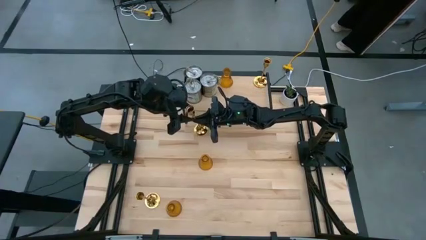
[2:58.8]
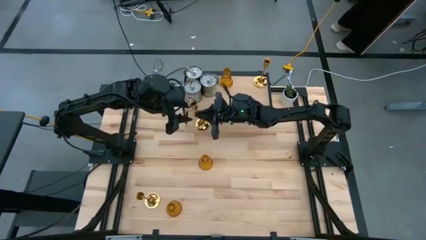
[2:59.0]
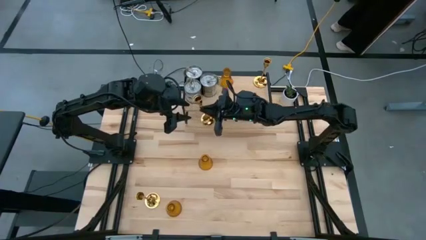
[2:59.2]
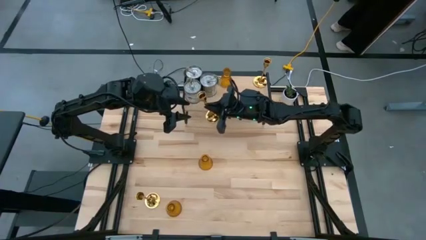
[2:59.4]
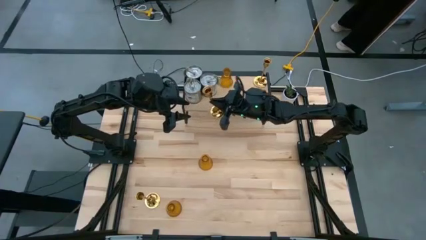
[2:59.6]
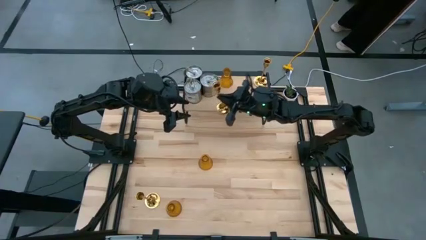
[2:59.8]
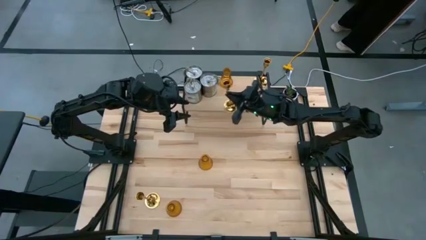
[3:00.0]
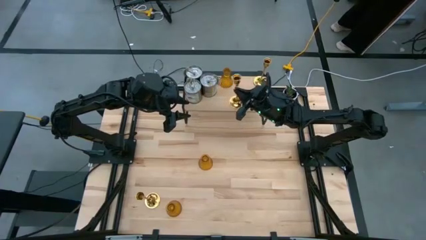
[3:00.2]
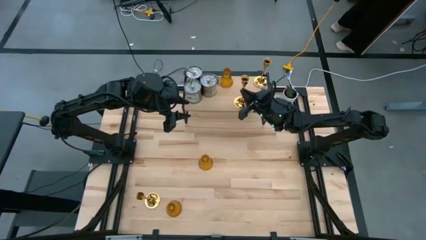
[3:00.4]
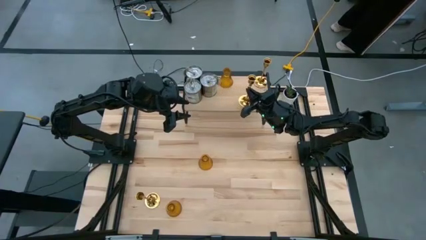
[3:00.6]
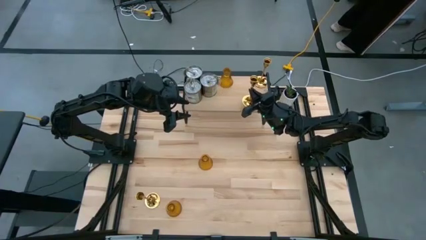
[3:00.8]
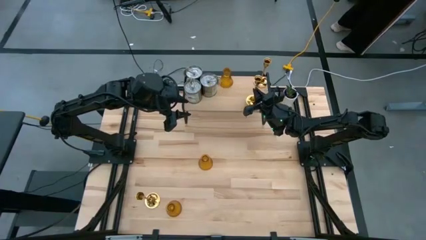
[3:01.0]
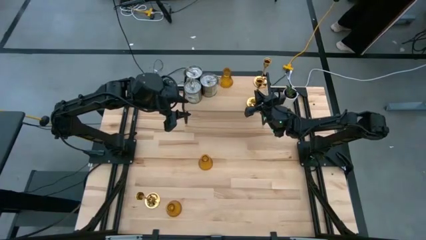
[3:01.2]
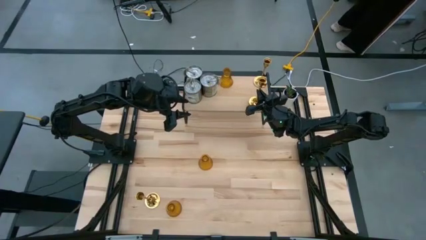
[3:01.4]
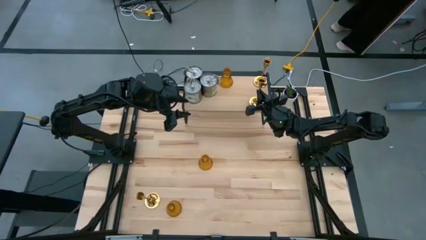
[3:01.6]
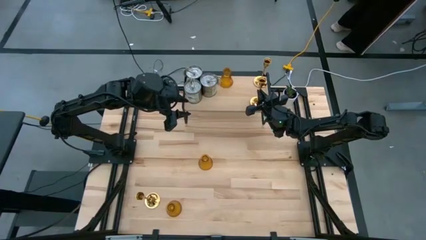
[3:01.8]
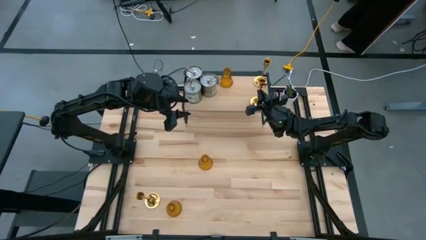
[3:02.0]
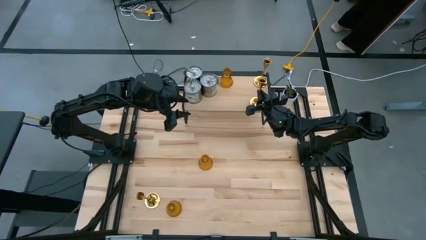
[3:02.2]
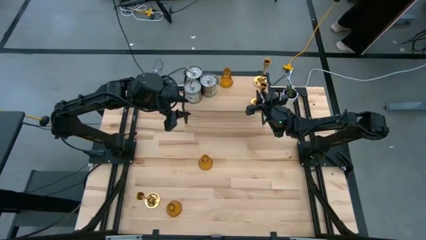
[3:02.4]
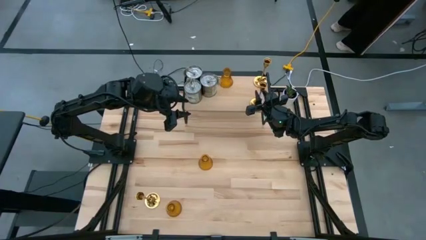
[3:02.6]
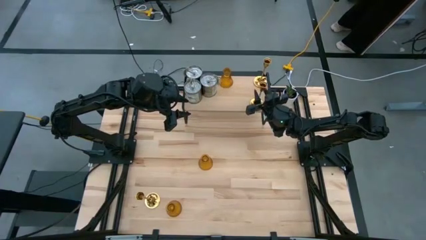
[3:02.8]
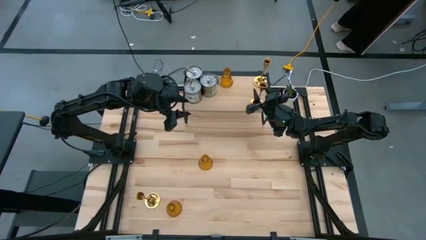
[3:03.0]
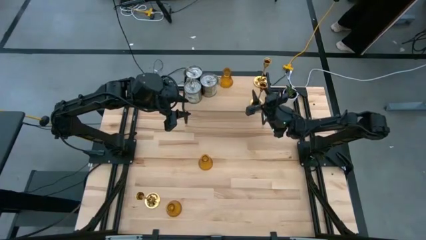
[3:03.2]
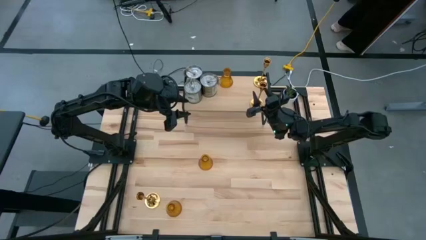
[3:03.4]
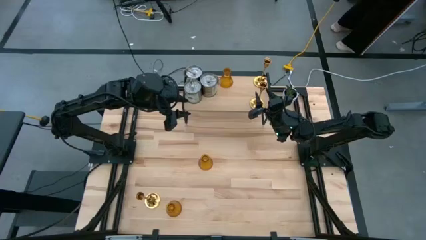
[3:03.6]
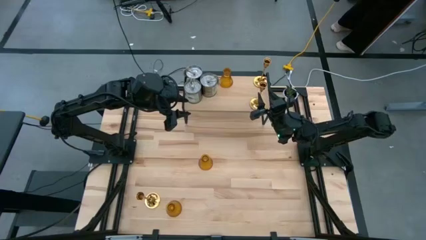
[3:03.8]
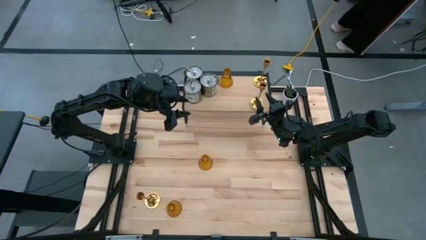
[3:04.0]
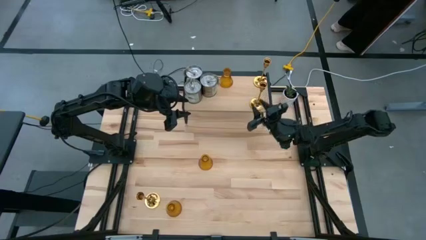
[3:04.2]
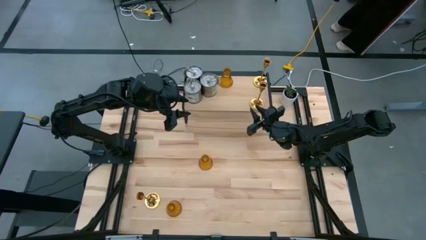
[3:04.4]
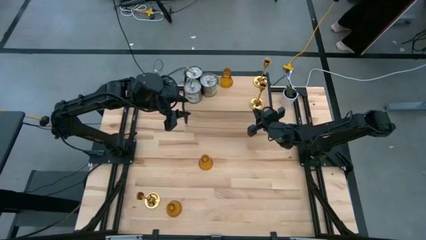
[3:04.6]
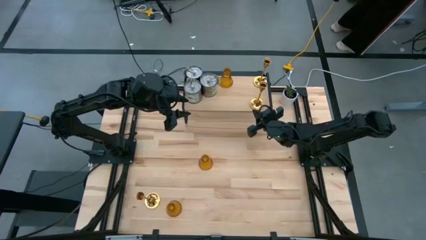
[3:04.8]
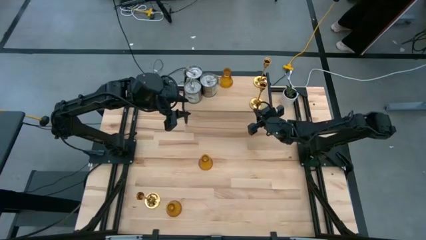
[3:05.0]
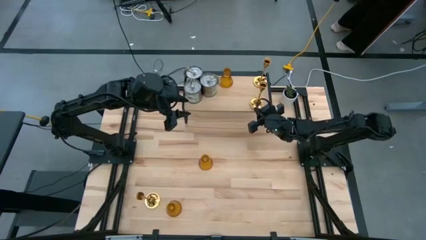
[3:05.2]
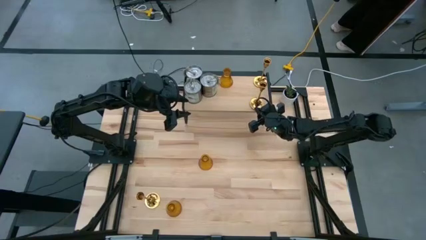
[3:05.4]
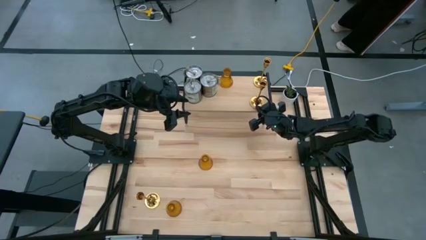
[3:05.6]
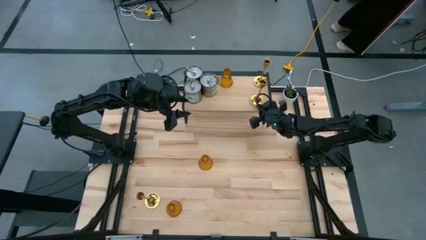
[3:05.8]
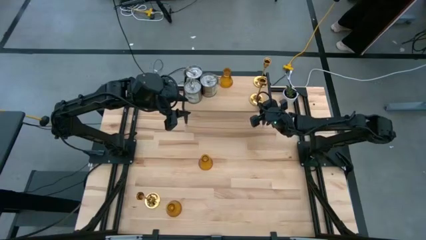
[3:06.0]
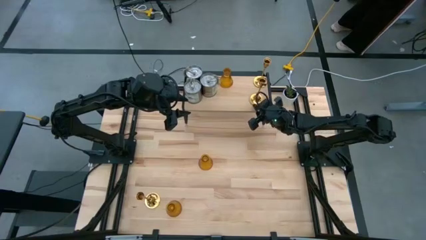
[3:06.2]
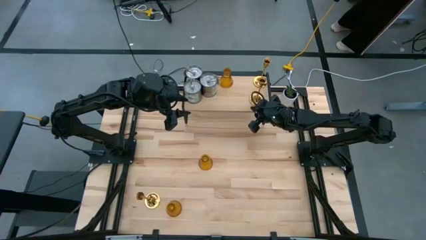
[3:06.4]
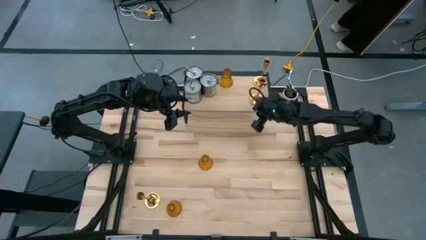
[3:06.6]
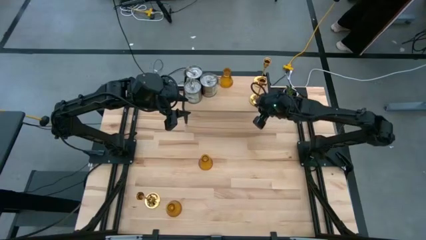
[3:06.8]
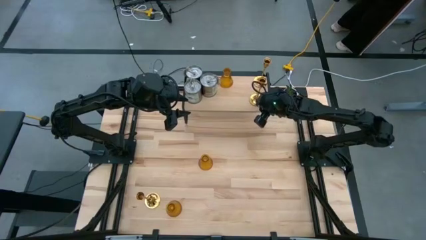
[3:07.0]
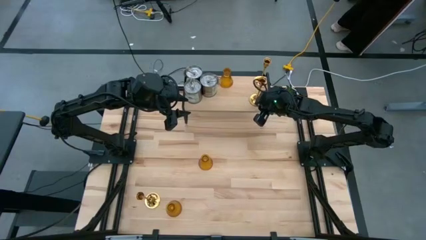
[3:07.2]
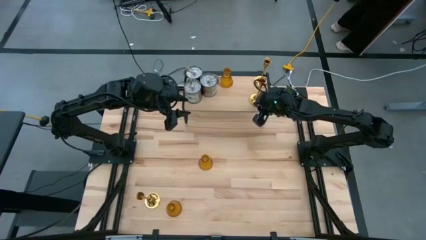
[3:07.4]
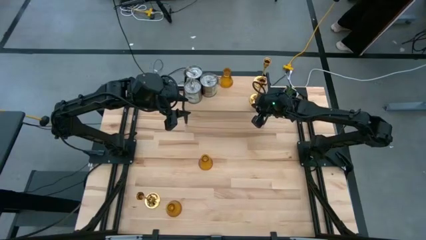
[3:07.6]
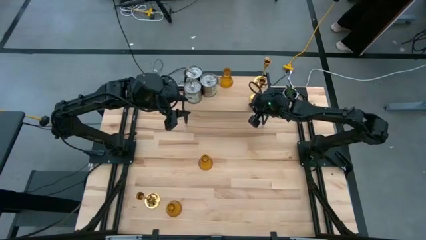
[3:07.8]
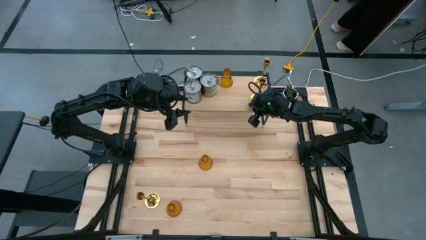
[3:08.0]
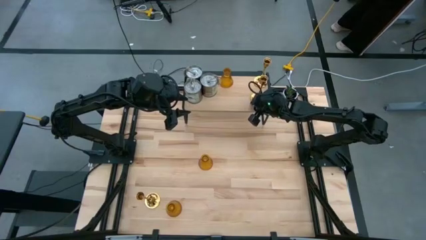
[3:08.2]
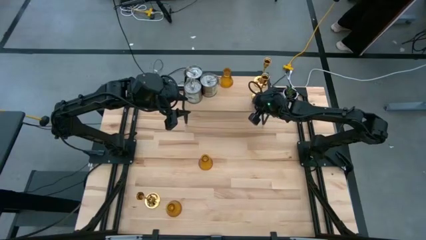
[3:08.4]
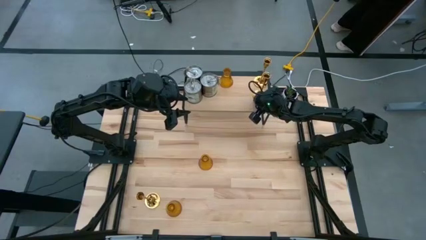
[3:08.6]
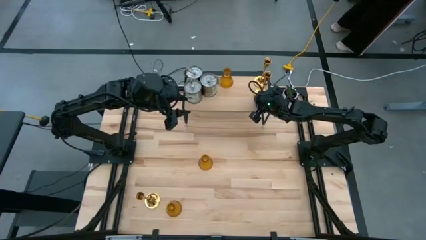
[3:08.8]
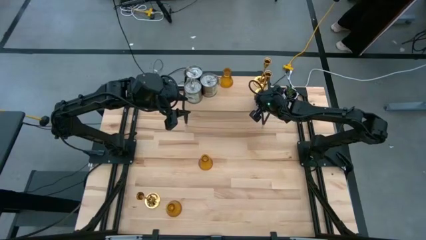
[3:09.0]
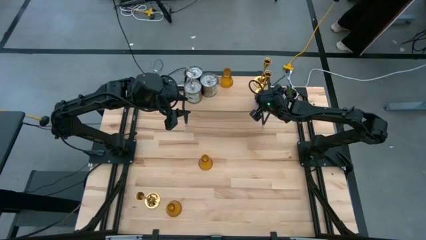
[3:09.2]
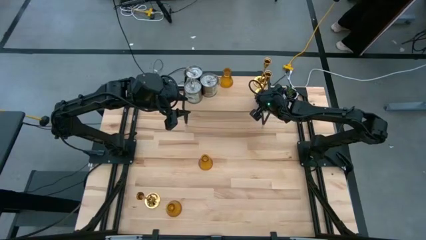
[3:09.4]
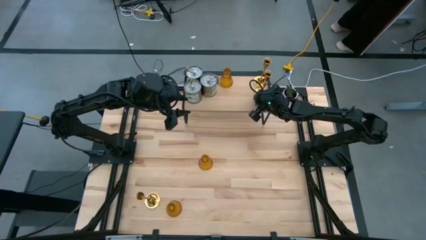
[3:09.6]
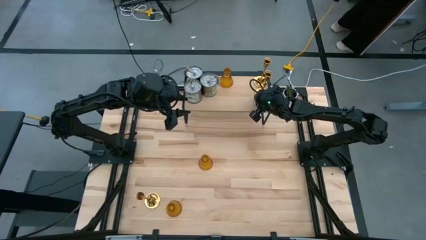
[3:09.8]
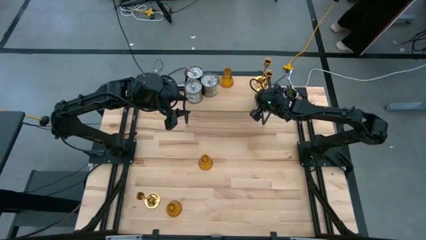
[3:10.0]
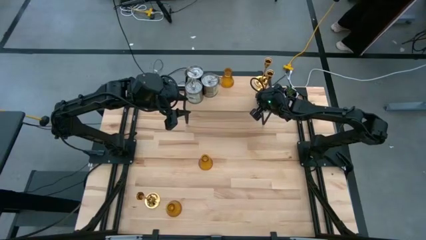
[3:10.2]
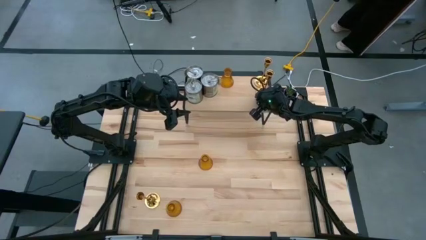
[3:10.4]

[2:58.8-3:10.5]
Task: Pick & Place candle stick holders
Put the top gold candle holder on the shelf aligned with the other gold candle holder

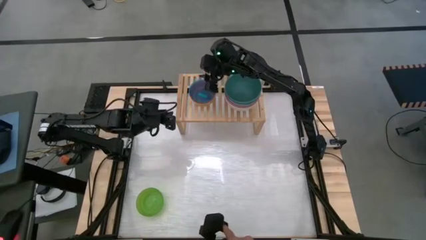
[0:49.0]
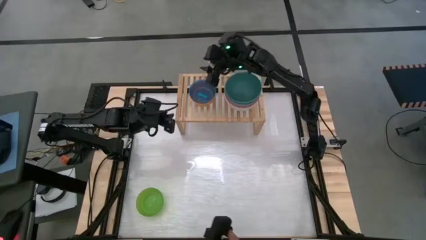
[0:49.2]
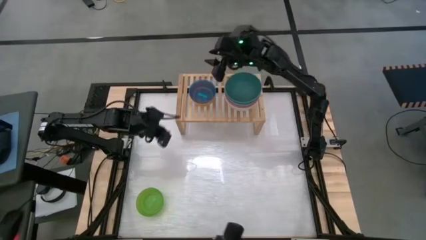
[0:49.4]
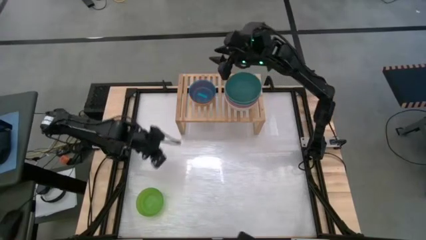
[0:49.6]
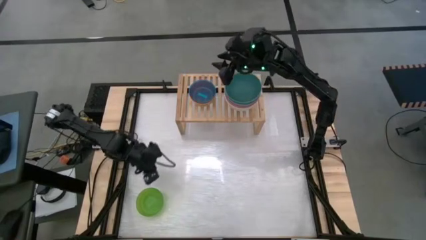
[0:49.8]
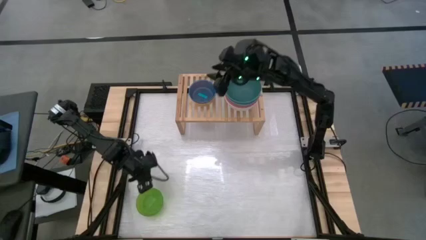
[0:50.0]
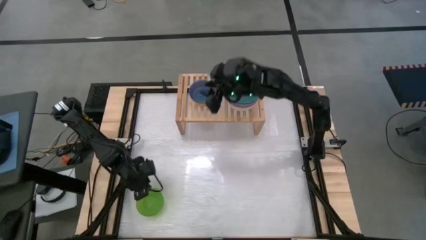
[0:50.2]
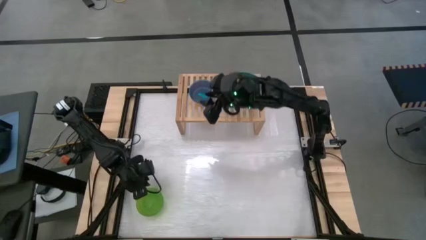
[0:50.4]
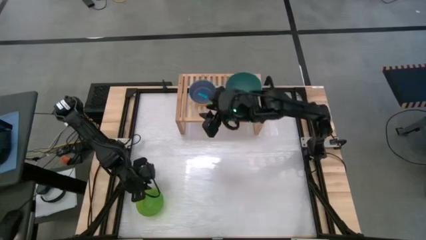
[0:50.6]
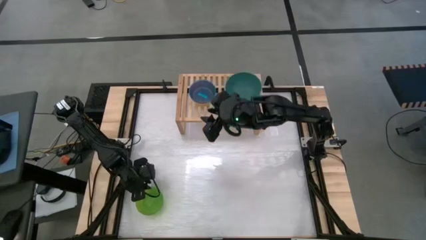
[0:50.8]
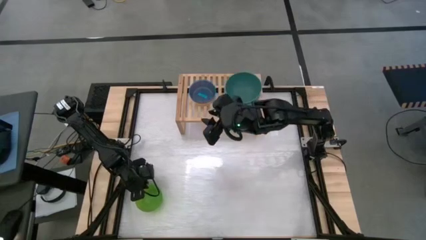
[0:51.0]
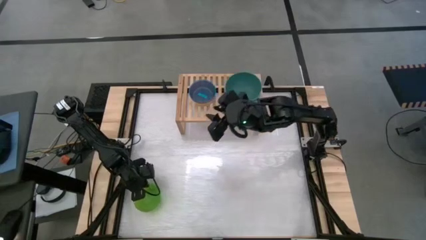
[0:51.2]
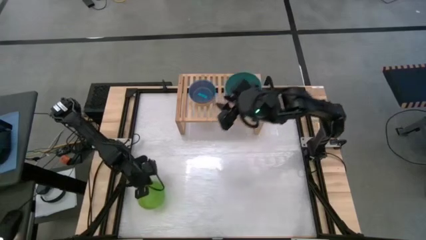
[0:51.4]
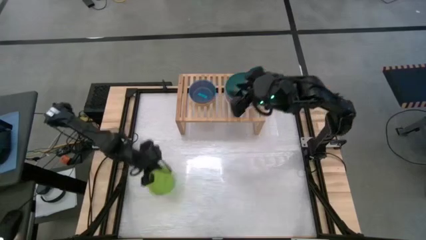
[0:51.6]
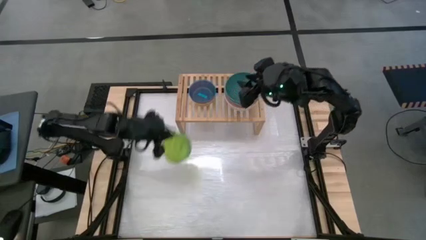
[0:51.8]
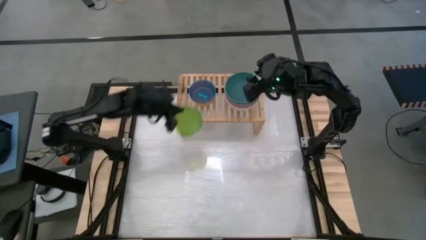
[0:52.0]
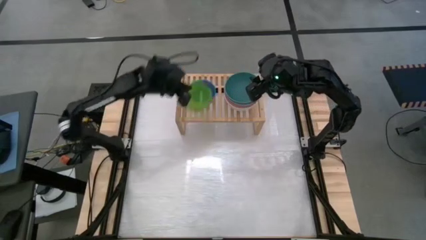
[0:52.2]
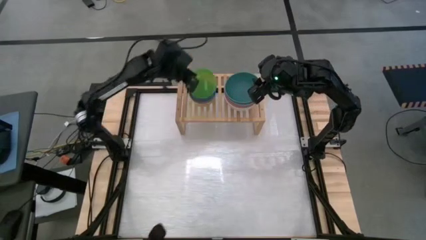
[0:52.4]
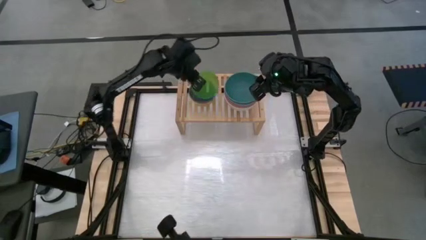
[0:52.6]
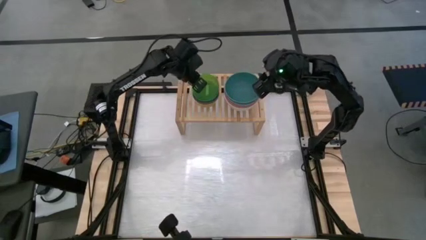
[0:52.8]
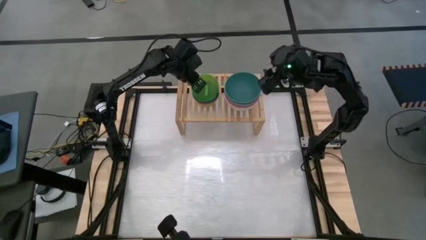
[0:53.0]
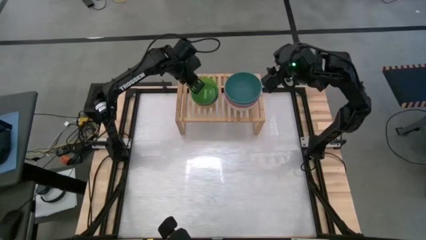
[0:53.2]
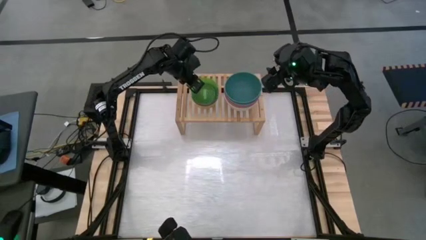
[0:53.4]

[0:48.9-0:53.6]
Task: Place and stack bowls onto a shelf
Stack the small green bowl on the stack small bowls on the shelf
